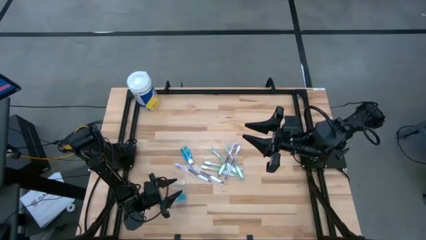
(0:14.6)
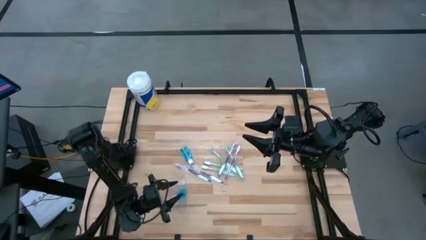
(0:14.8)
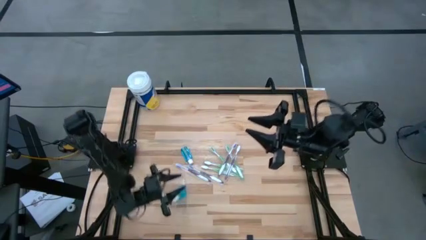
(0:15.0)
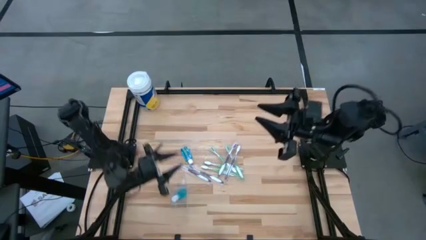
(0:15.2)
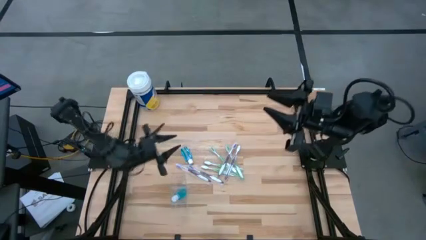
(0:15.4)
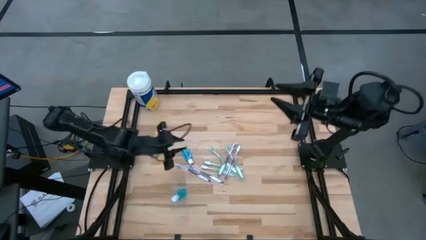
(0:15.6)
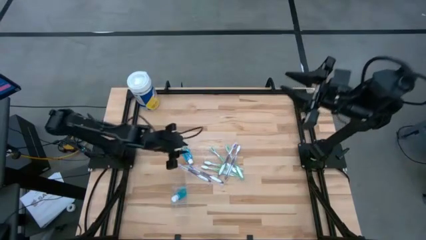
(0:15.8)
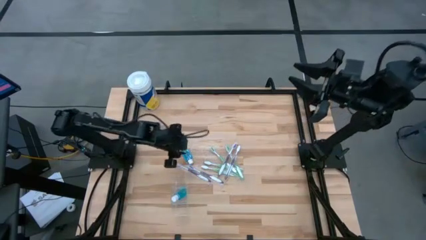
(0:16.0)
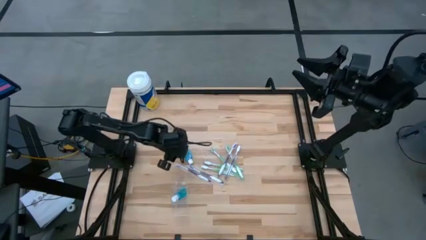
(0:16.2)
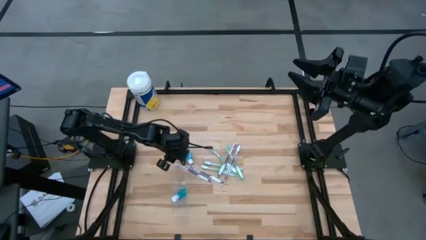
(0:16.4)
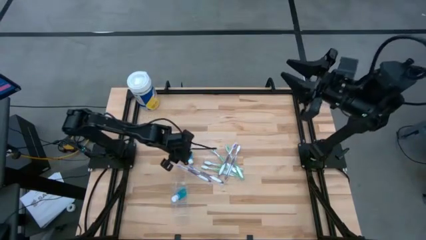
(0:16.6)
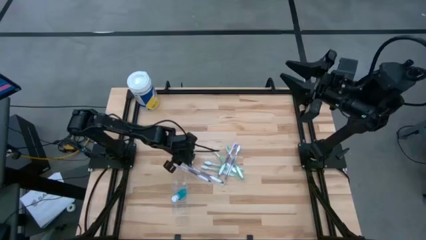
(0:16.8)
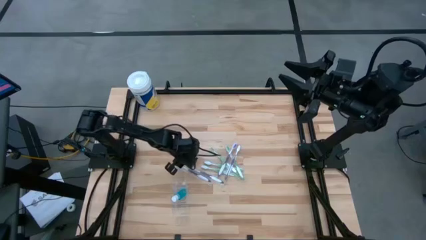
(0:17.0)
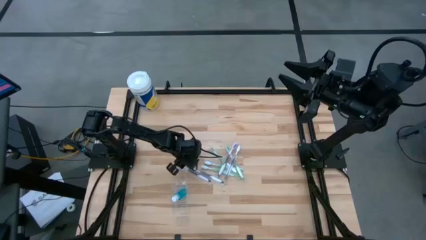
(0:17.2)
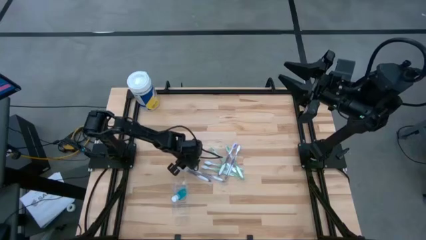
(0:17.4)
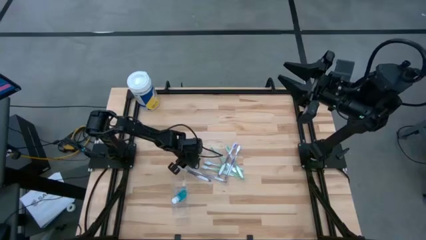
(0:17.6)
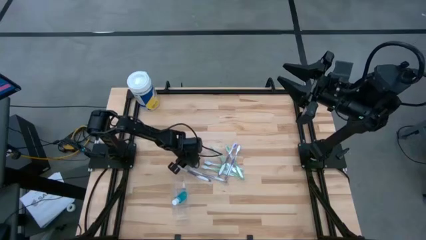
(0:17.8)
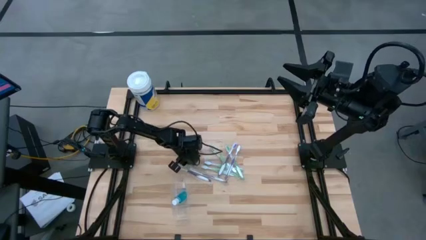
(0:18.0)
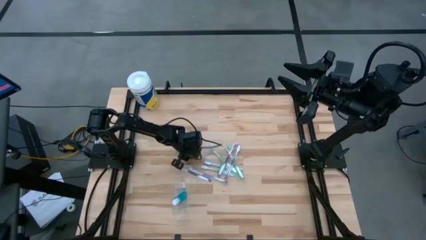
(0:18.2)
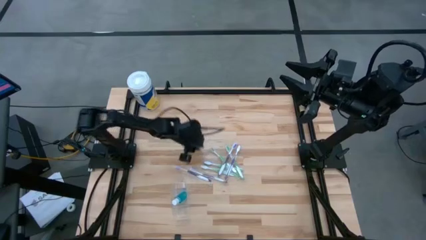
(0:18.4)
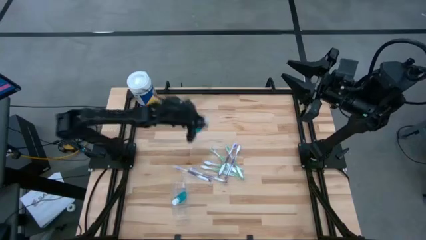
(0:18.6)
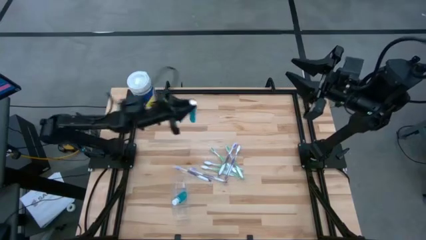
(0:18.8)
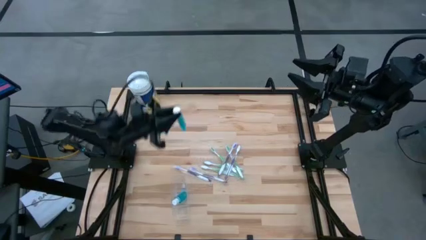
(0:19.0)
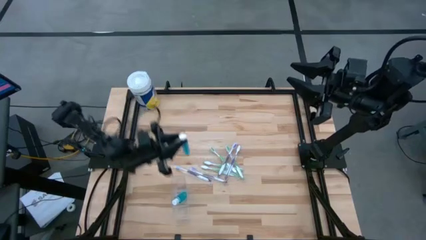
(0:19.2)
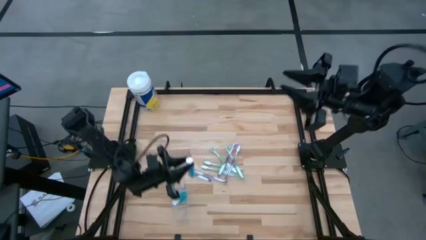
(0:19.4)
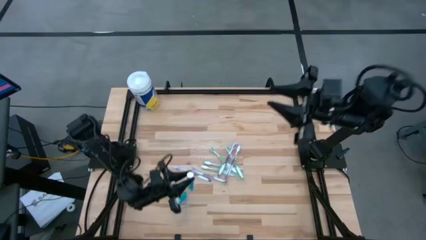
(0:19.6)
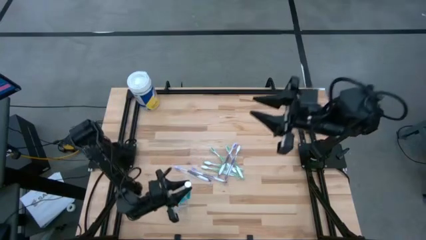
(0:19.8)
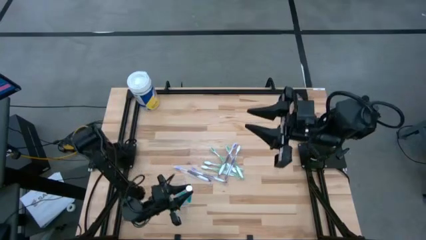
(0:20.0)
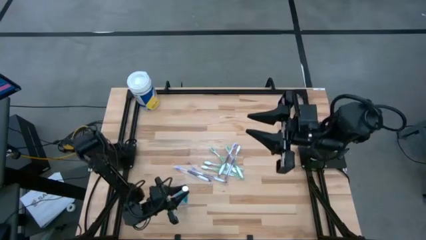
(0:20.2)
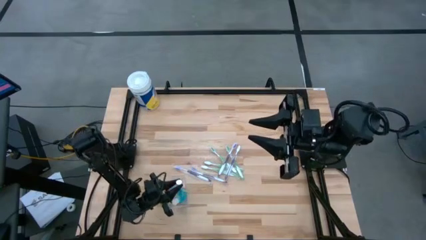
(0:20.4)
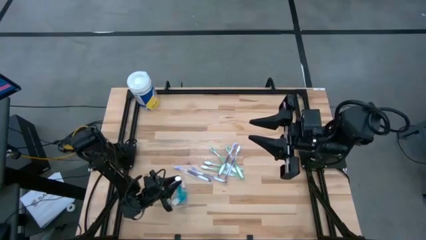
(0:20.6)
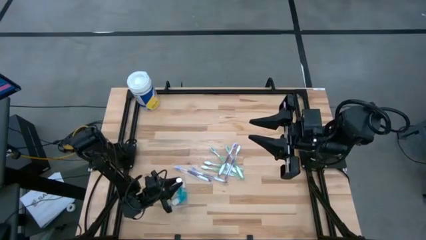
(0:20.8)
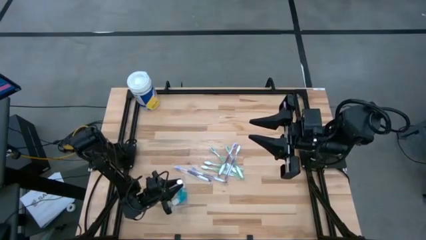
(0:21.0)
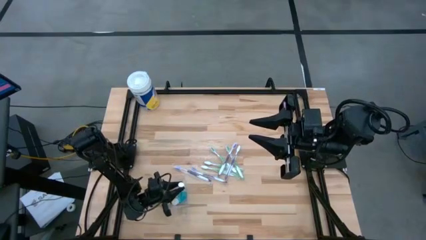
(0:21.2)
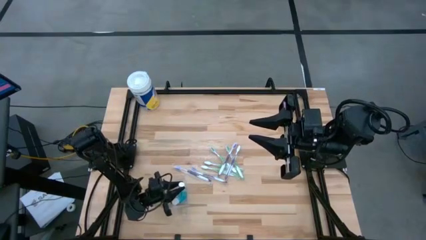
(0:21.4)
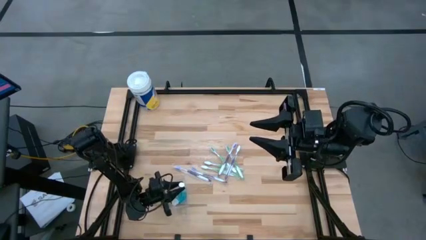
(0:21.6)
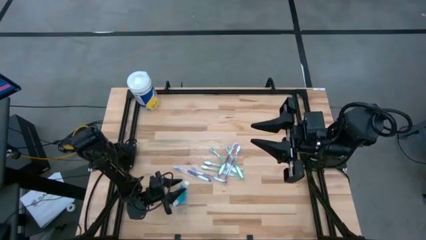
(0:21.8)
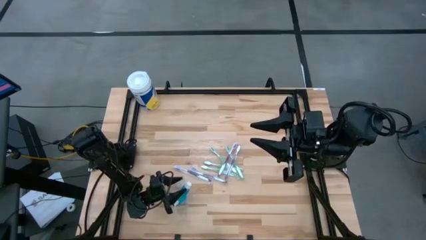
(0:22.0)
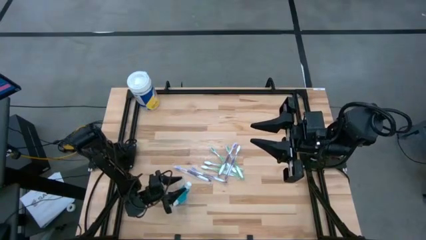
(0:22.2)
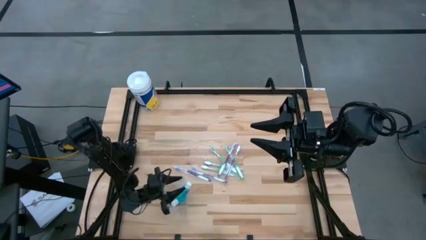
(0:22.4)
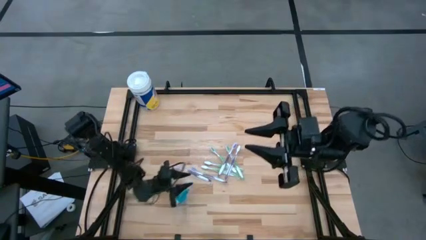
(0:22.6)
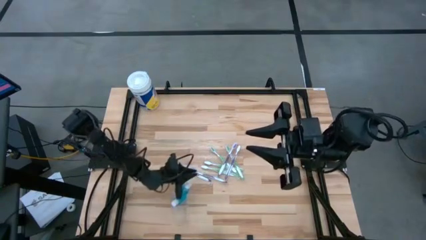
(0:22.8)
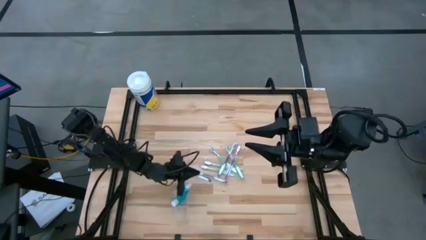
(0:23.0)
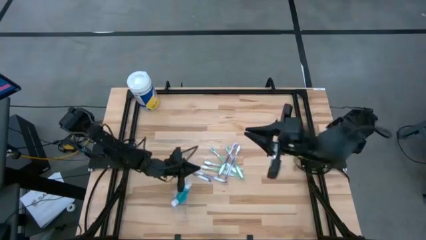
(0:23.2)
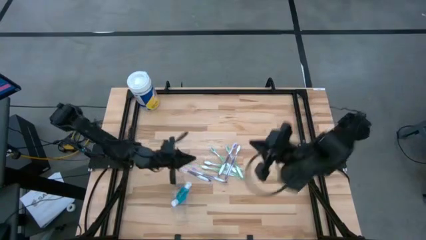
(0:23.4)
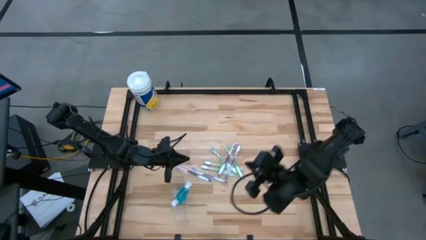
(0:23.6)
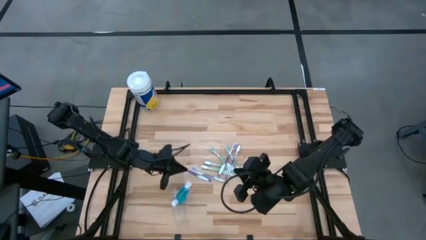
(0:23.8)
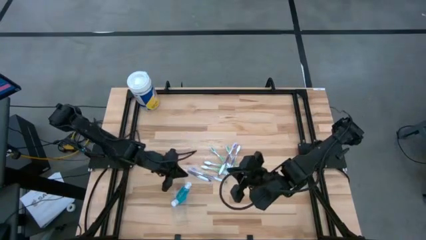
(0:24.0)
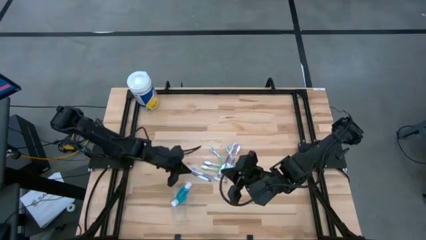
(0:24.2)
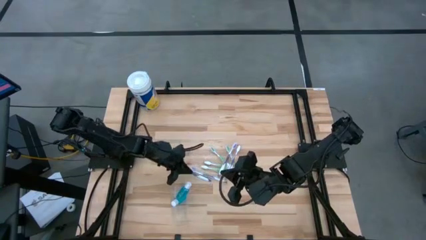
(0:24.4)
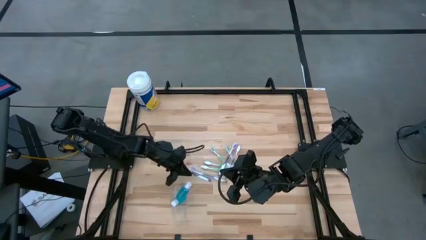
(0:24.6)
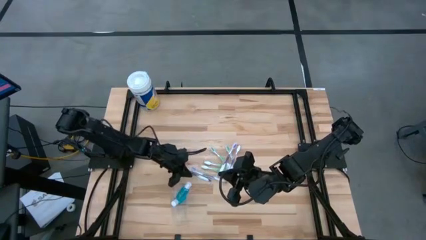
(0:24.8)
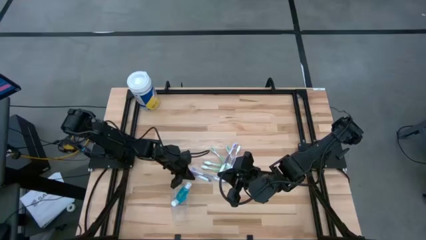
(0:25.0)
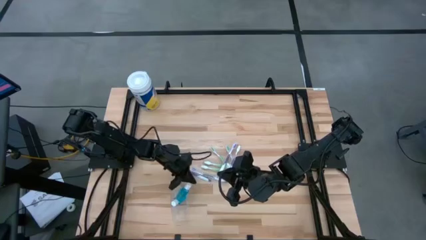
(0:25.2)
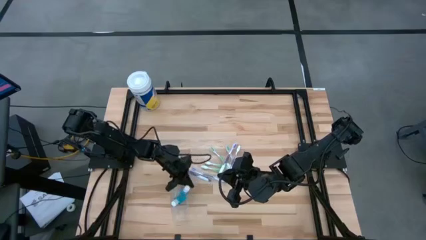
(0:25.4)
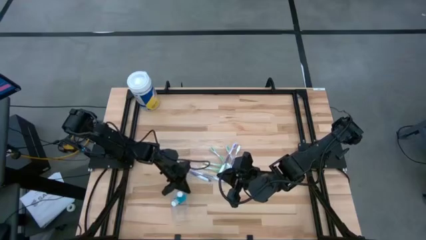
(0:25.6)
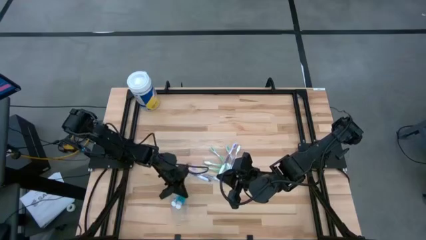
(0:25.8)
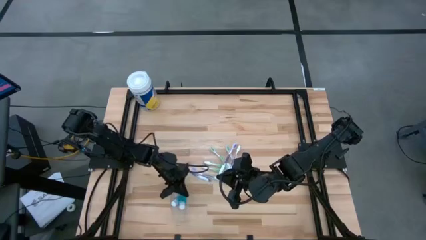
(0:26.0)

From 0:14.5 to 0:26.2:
Task: Pick & Place toothbrushing station
Put the blue mouthwash into the transparent organizer

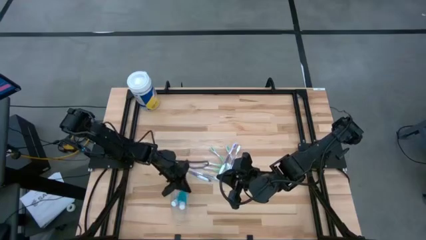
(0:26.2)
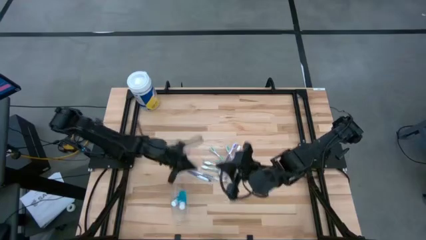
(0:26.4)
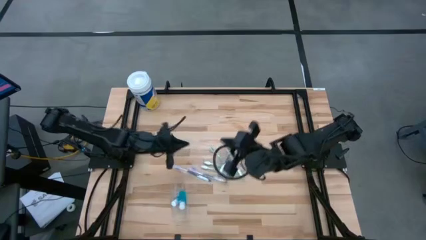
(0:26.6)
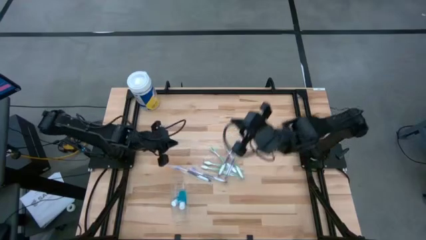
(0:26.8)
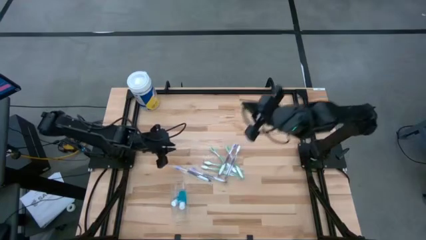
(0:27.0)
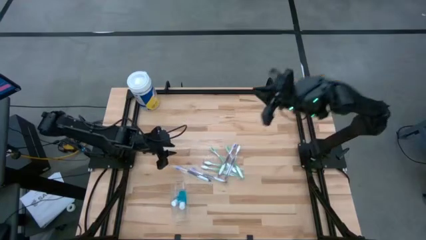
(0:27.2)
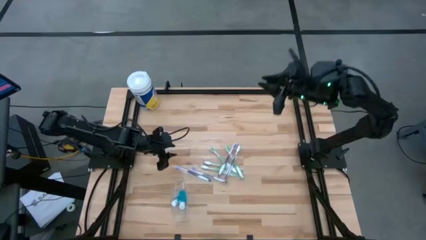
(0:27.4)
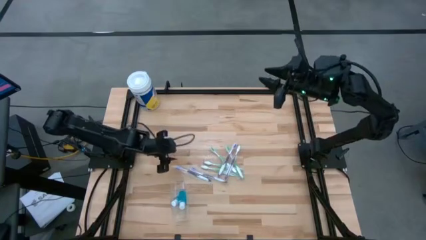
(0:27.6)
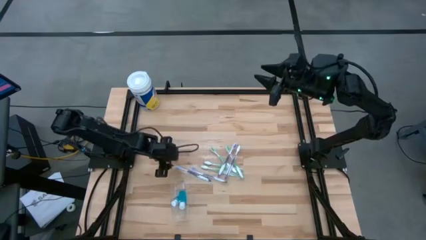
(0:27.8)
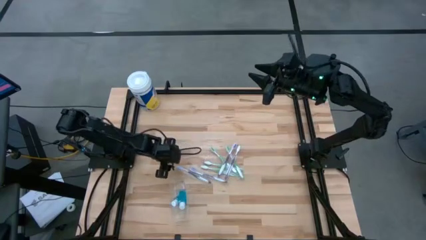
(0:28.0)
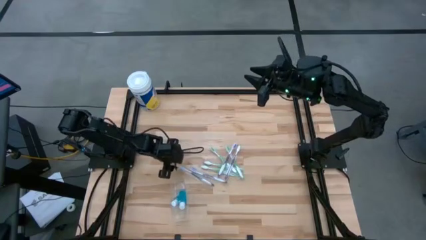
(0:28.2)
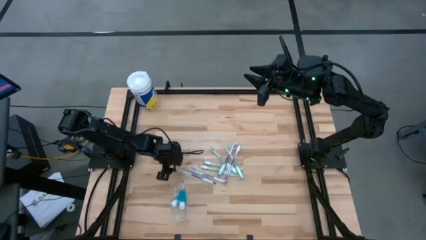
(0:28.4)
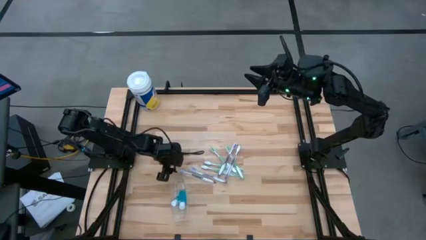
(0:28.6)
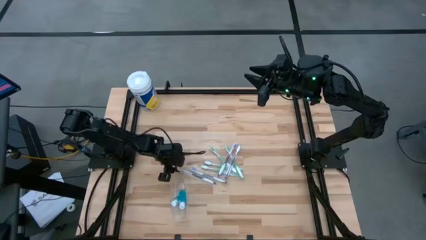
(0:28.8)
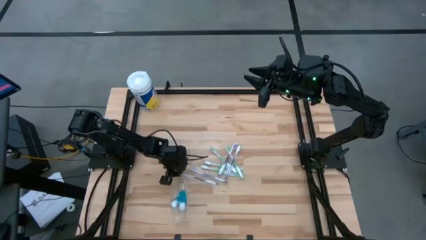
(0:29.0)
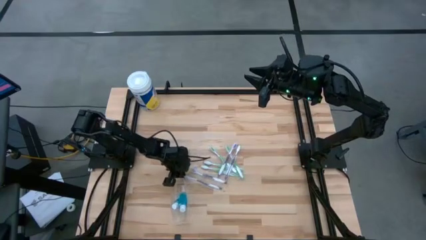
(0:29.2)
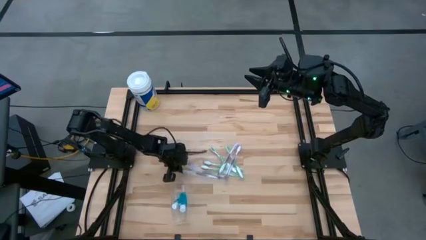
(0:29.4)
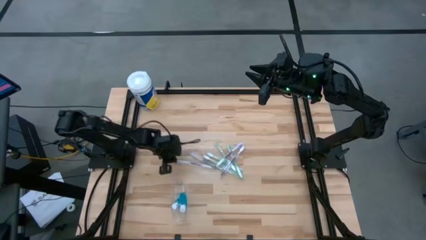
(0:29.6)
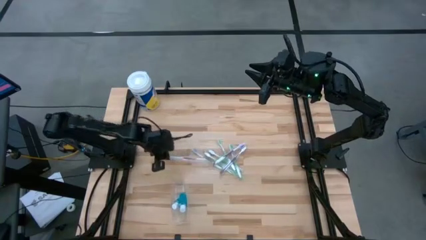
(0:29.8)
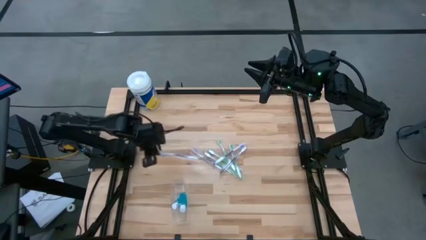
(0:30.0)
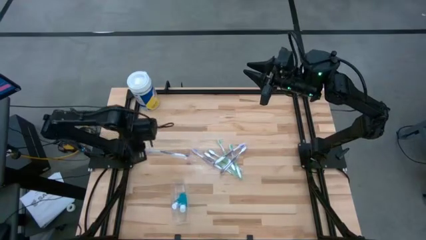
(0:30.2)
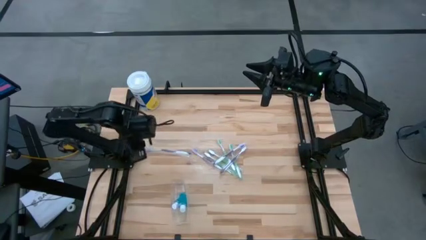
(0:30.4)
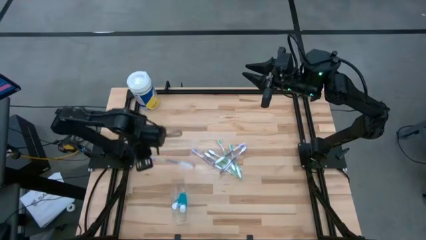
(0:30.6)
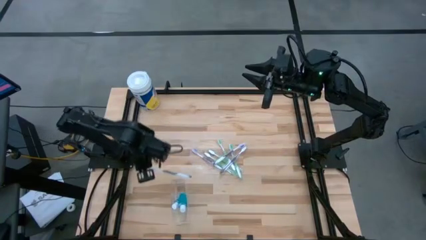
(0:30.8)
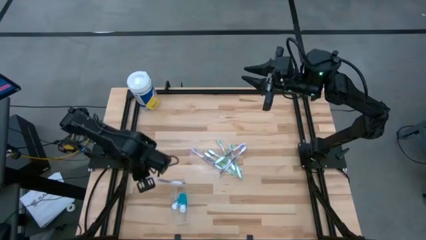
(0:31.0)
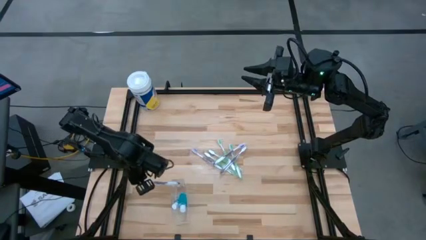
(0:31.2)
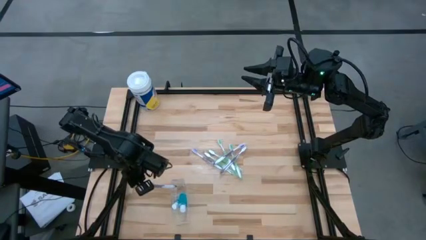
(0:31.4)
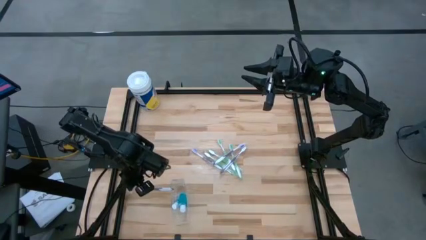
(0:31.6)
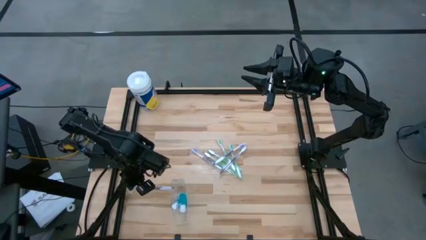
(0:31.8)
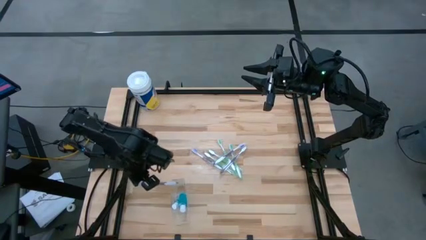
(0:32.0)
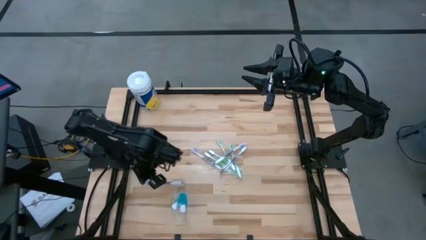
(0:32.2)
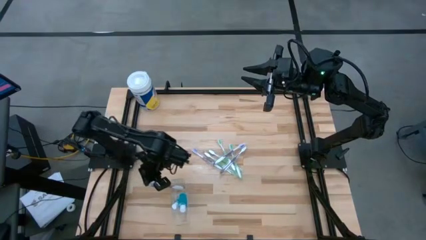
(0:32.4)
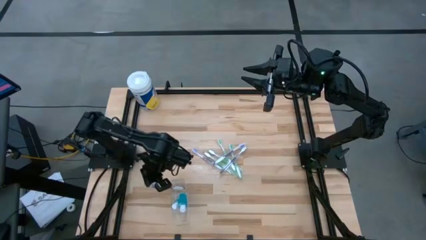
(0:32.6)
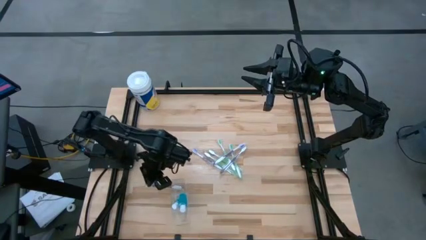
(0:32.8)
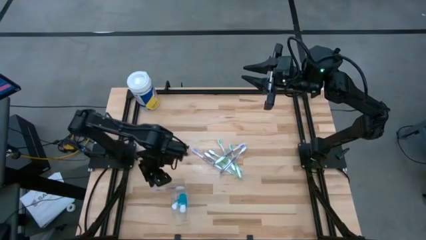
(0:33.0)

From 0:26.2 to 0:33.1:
Put the purple toothbrush into the transparent organizer
